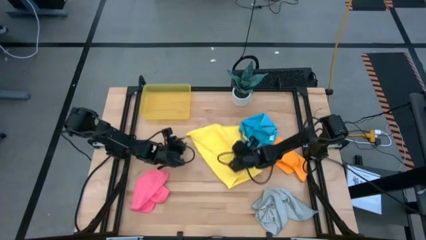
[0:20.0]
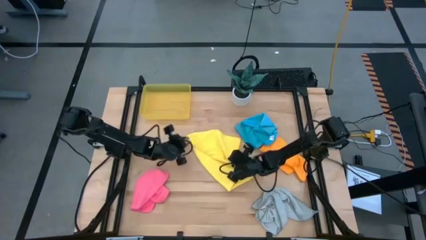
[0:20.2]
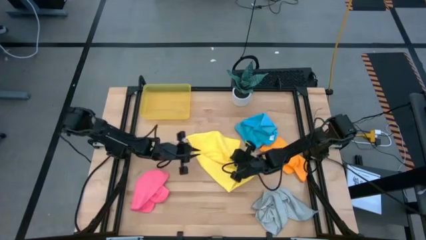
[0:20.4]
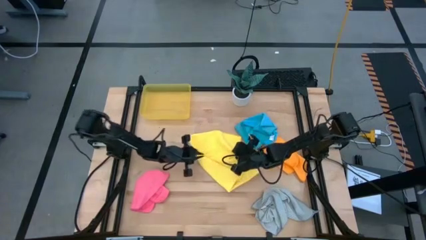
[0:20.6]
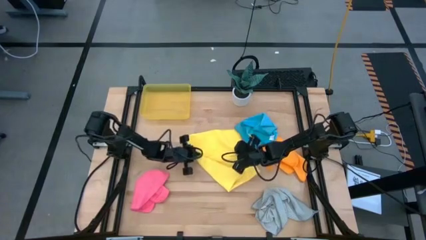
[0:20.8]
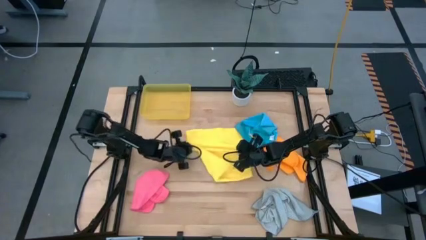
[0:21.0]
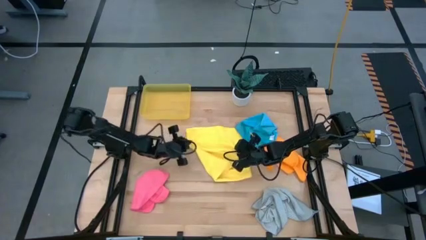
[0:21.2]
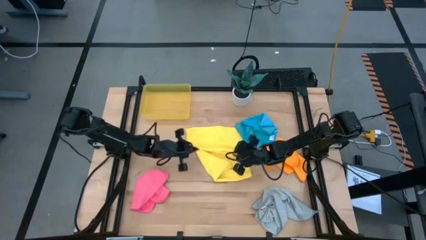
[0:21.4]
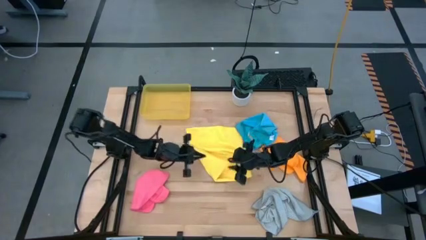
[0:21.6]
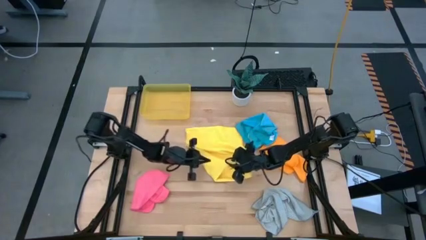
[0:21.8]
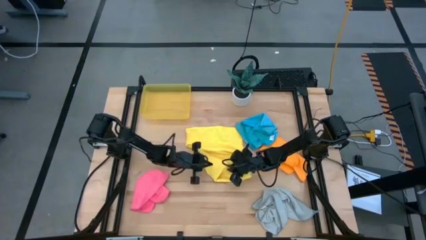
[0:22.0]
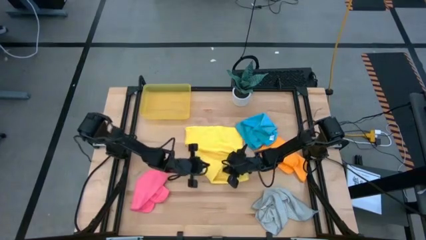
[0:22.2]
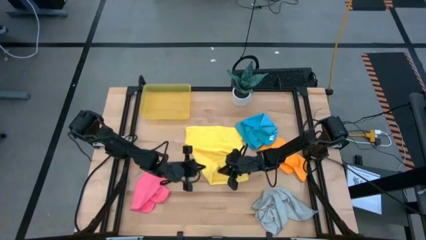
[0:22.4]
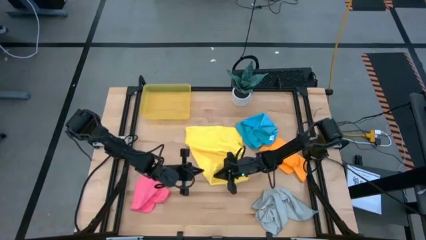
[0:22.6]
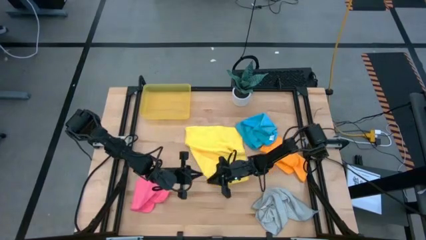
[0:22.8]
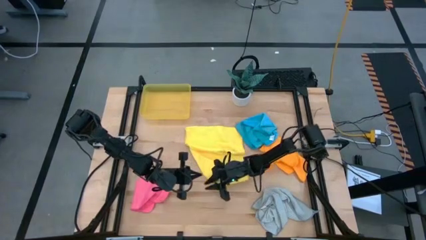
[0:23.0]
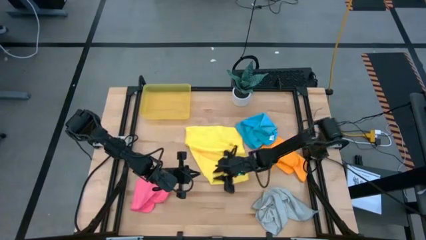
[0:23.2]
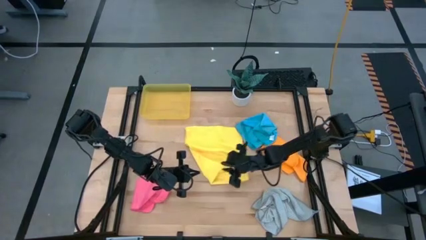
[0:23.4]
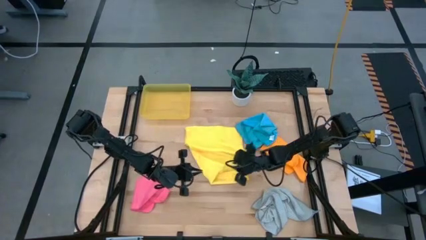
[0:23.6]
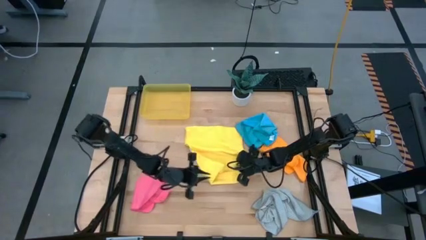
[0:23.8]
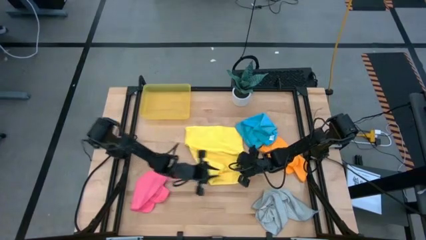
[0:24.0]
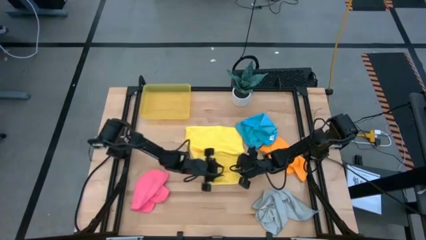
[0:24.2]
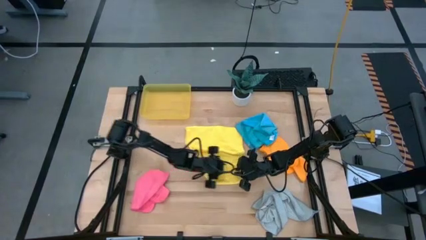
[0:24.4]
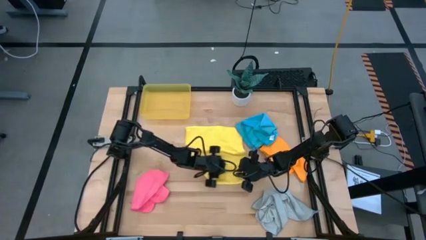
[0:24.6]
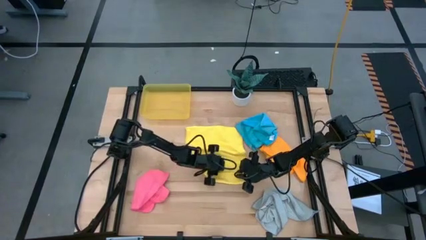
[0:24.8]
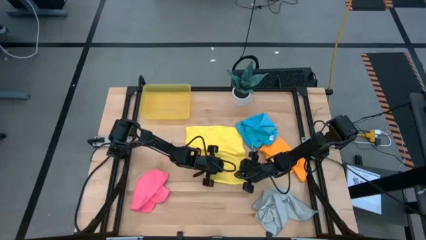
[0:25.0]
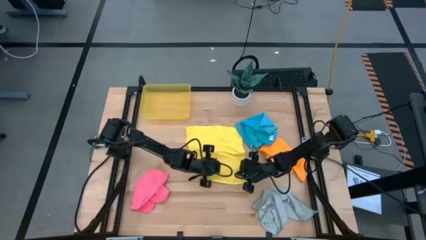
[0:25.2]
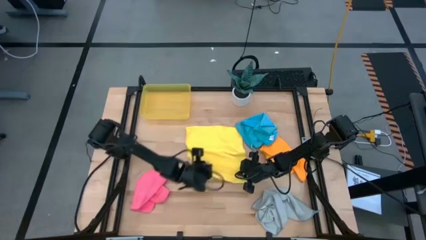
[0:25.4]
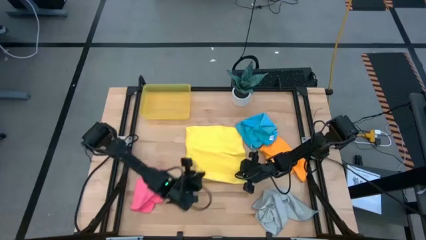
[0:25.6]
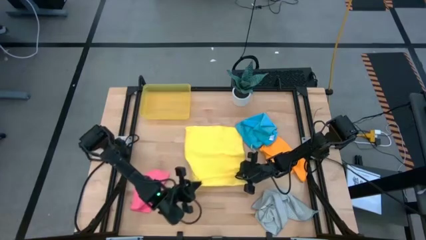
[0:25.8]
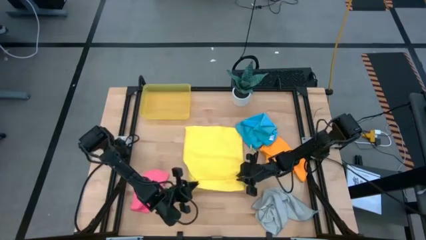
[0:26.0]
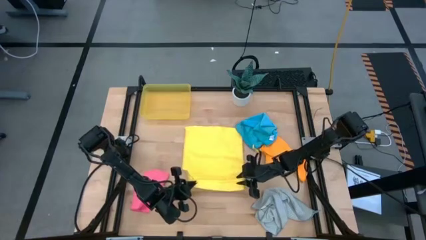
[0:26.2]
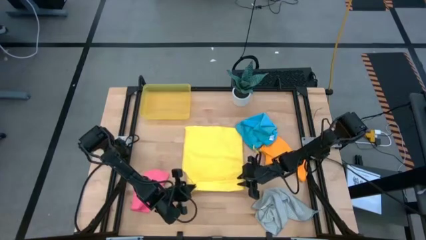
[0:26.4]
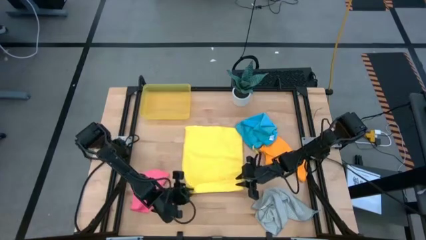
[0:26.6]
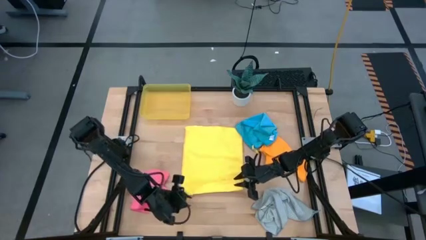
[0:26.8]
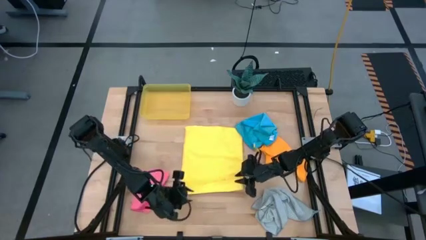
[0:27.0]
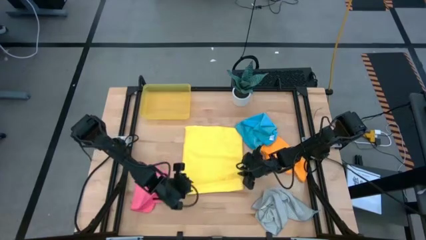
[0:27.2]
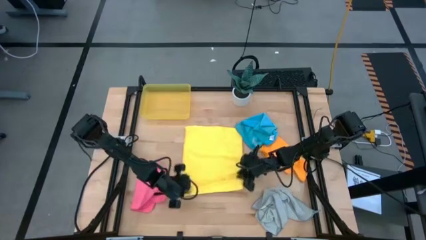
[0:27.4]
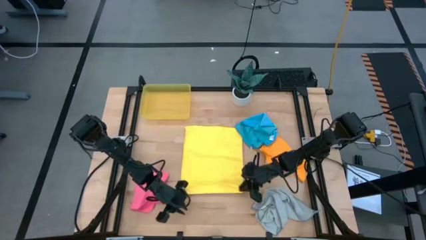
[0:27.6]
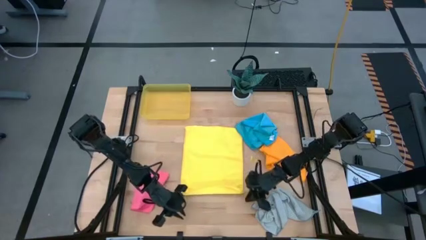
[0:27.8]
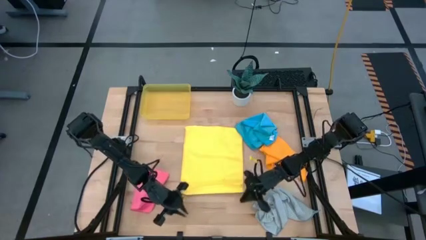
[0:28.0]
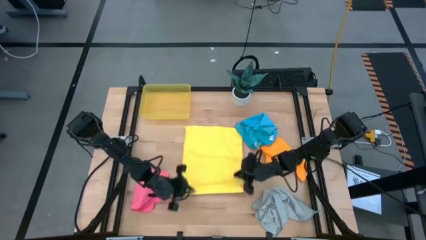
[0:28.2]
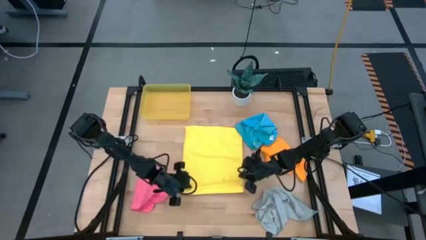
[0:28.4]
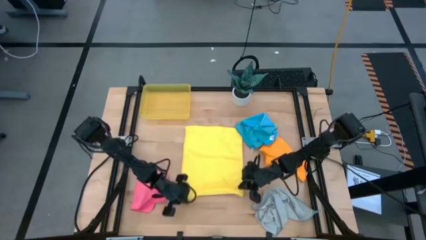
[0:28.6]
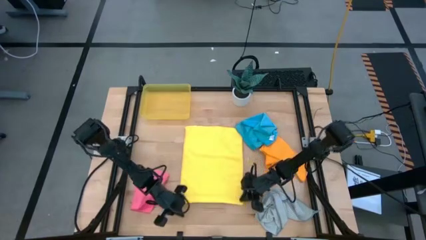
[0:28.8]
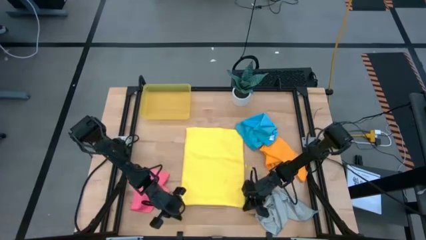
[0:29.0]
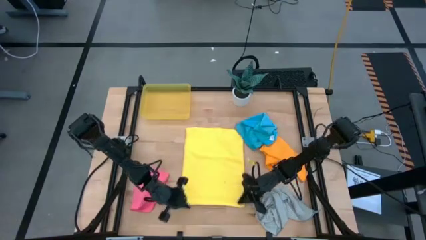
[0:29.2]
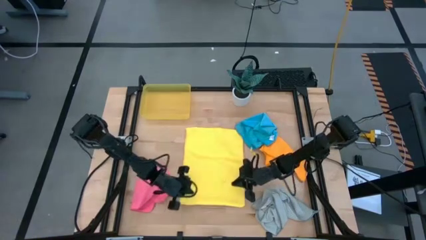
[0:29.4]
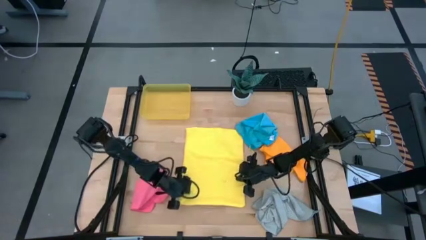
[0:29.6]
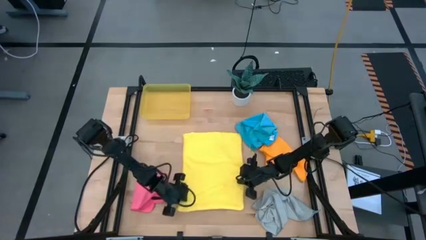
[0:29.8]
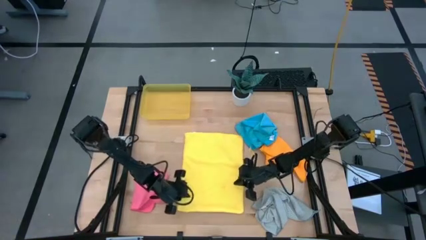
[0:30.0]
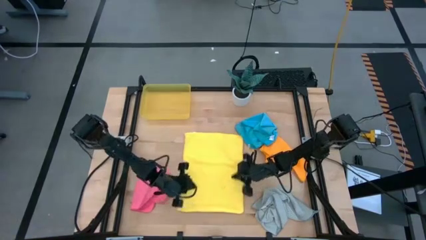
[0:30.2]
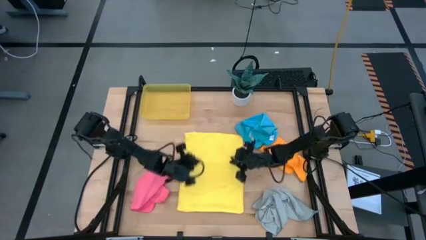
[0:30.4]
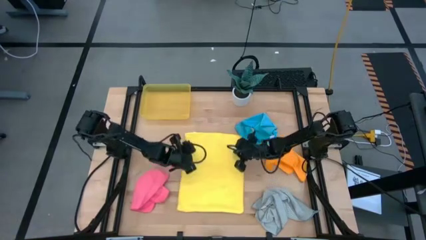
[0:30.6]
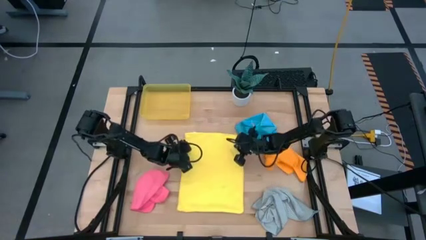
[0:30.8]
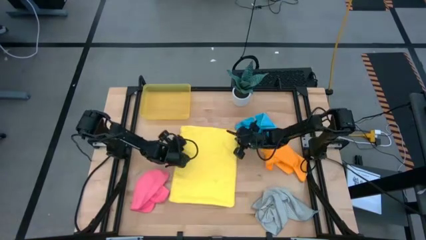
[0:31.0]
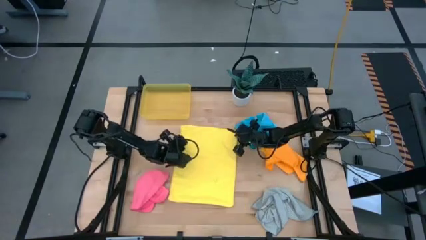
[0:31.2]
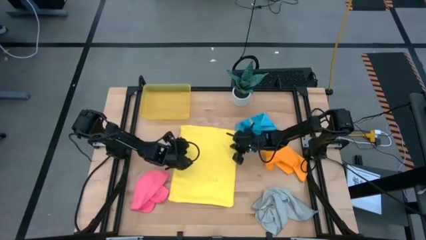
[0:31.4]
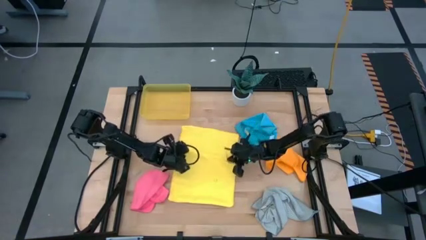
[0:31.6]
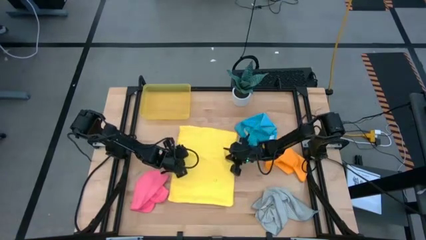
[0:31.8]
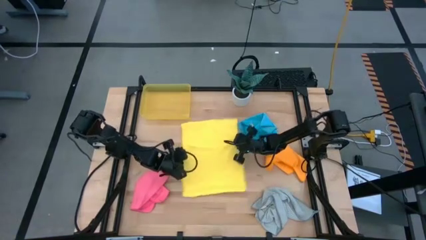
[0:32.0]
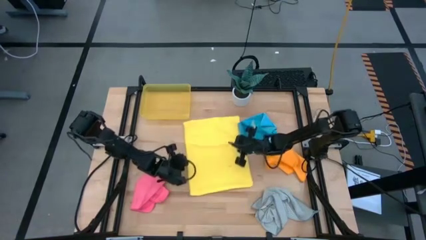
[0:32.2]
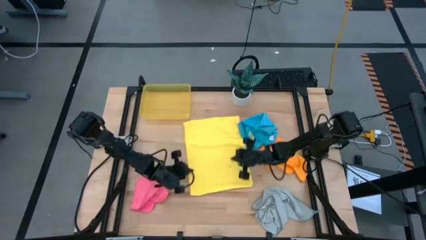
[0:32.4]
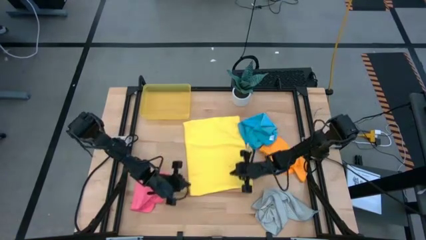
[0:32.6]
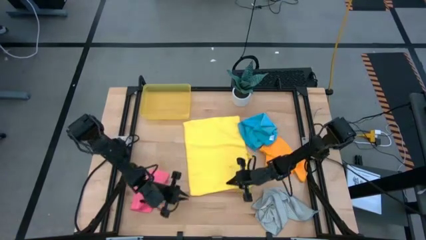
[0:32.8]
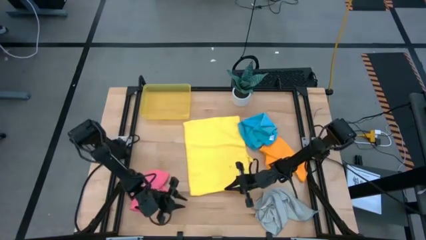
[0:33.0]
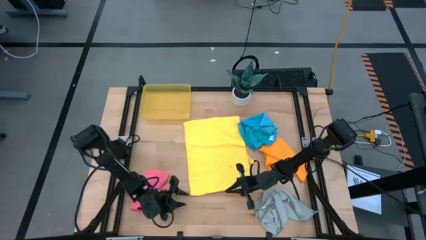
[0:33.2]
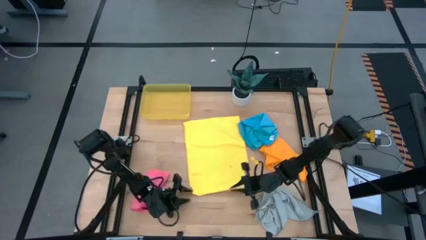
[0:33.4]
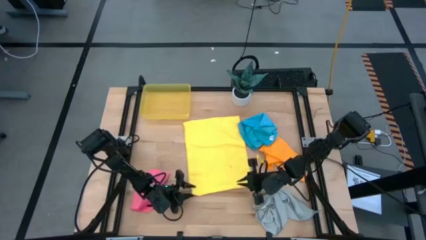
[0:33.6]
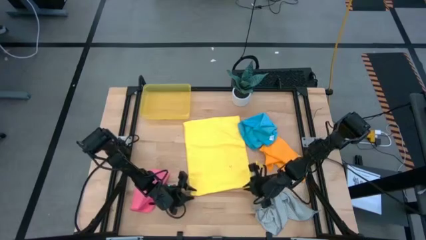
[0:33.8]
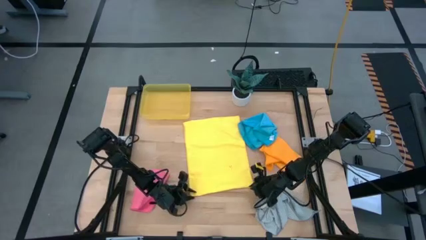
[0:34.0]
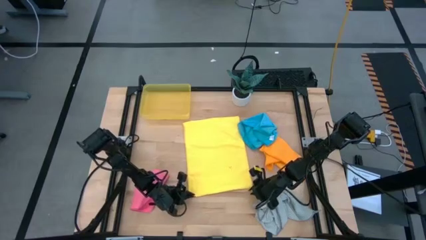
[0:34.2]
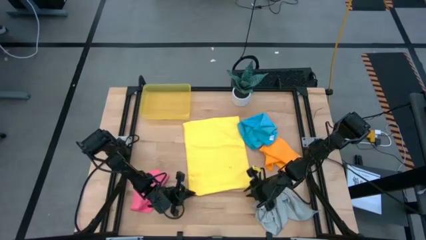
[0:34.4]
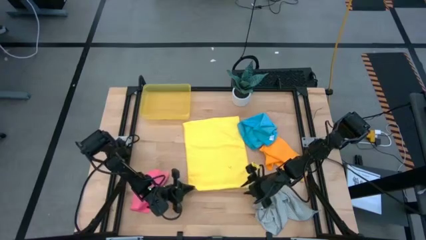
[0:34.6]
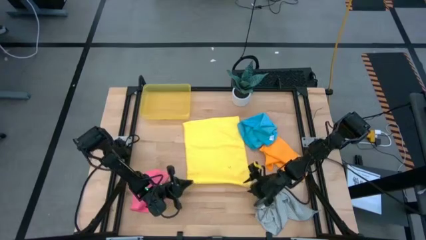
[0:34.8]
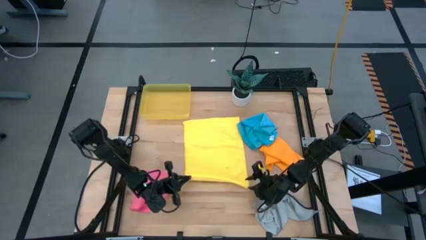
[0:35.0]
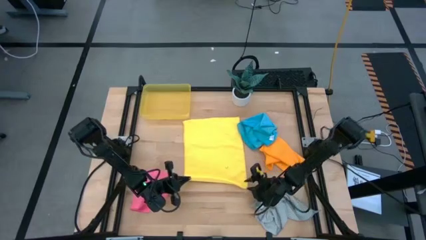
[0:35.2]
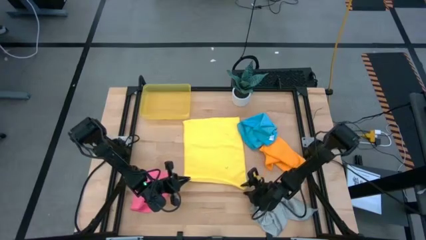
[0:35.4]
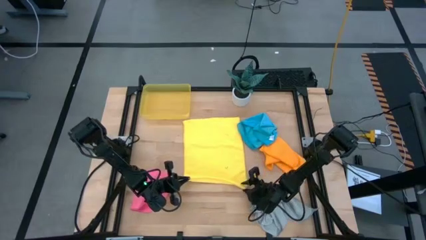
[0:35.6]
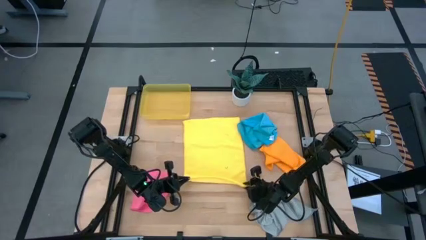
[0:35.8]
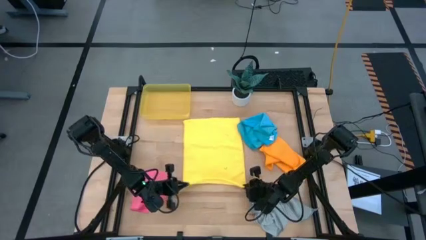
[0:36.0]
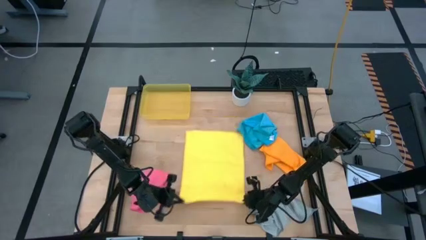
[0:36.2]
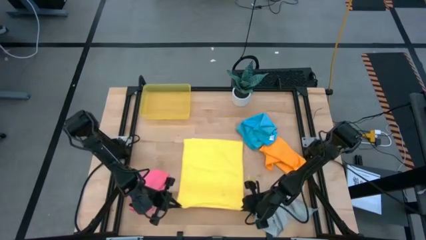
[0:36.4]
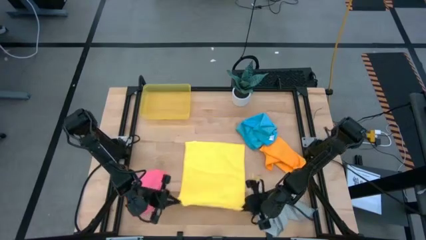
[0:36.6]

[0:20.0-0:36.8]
Task: Fold microfiber towels
Fold the yellow microfiber cloth
